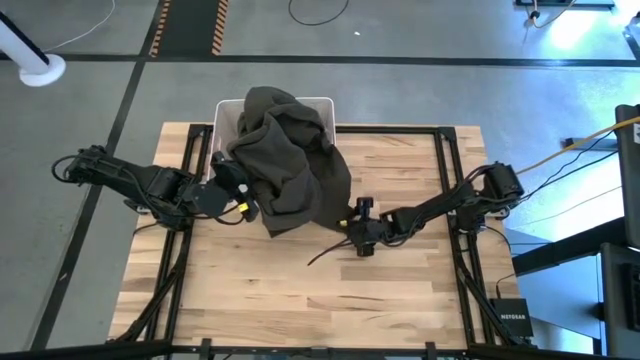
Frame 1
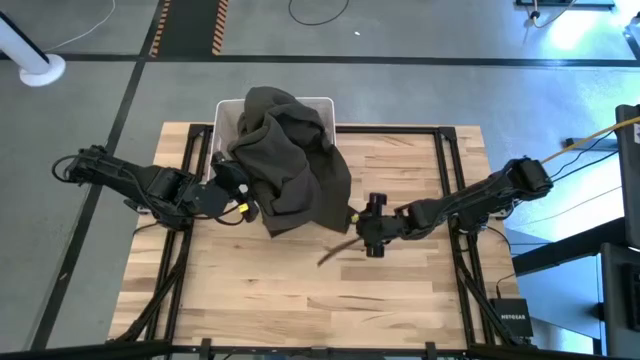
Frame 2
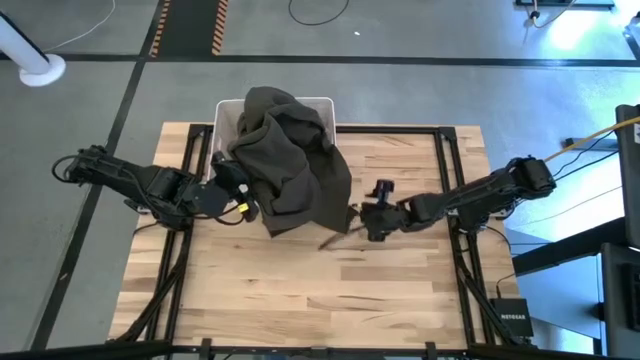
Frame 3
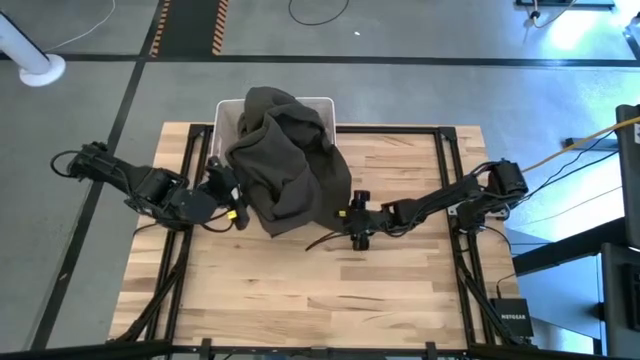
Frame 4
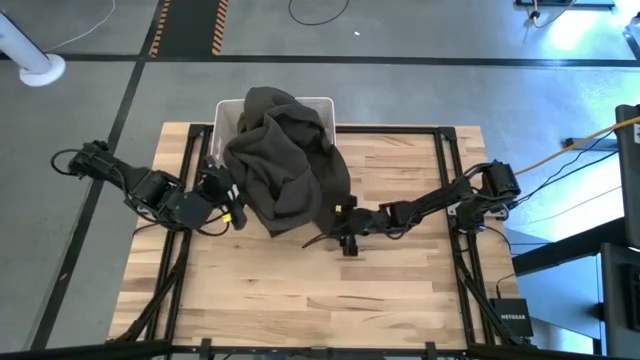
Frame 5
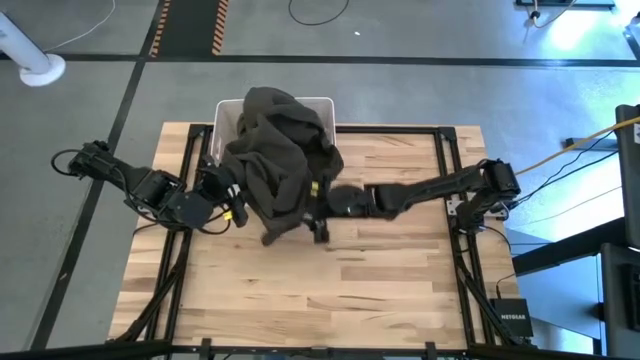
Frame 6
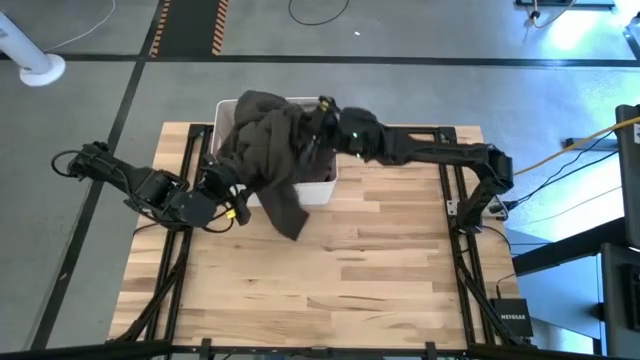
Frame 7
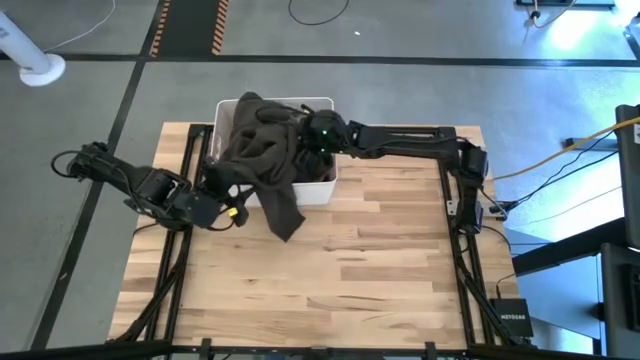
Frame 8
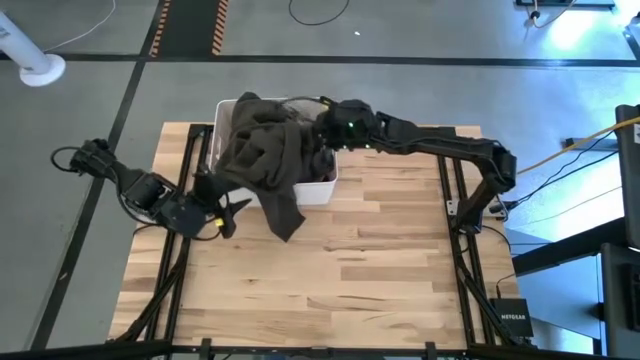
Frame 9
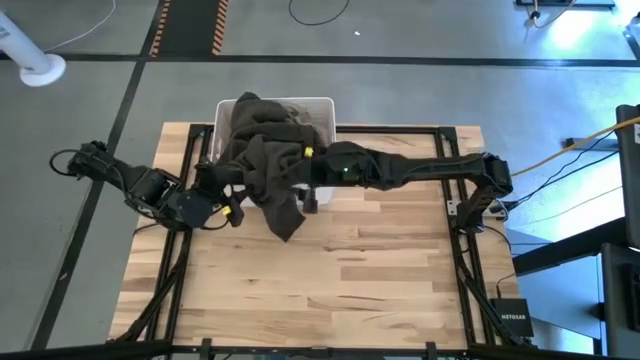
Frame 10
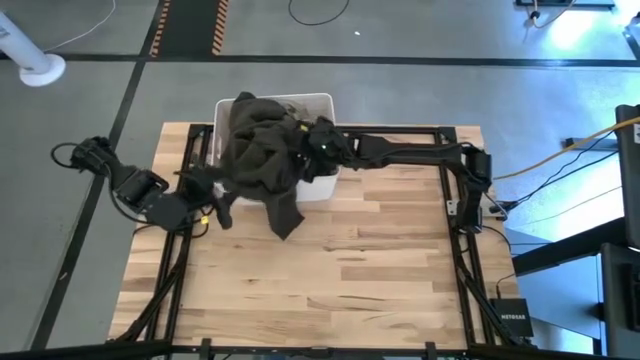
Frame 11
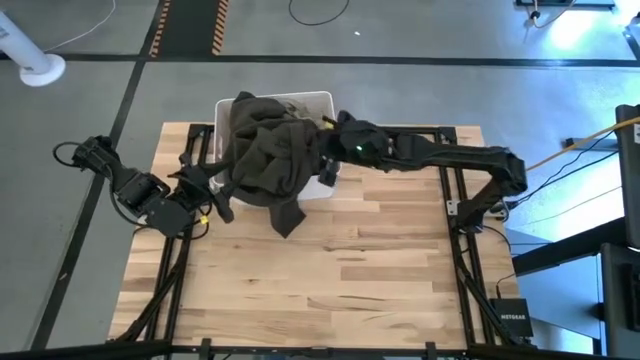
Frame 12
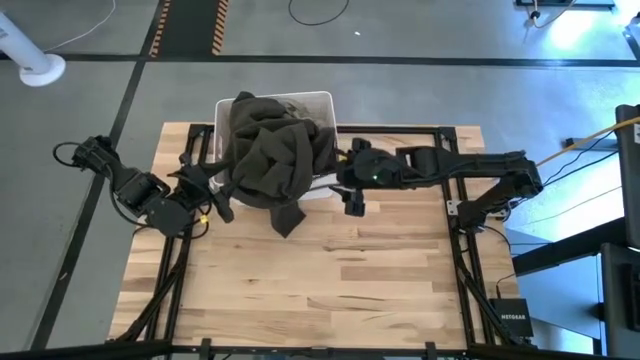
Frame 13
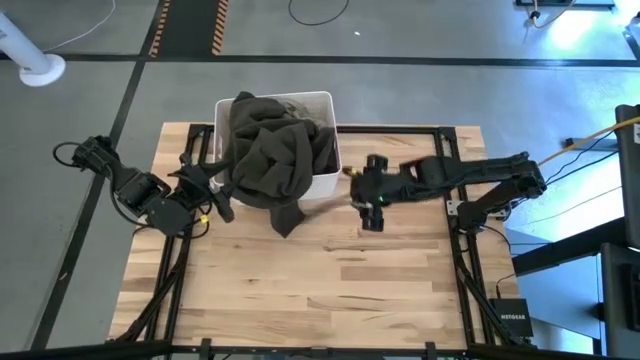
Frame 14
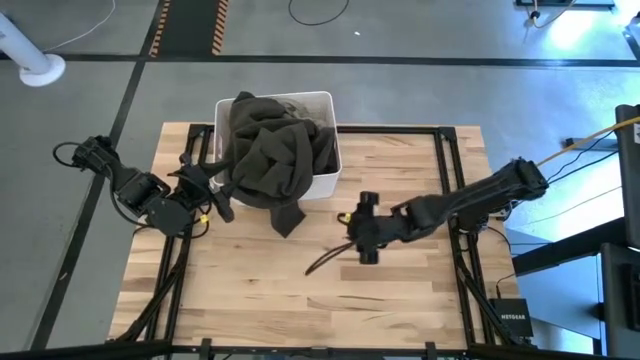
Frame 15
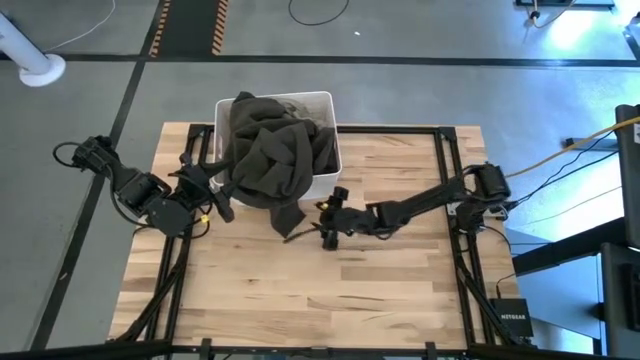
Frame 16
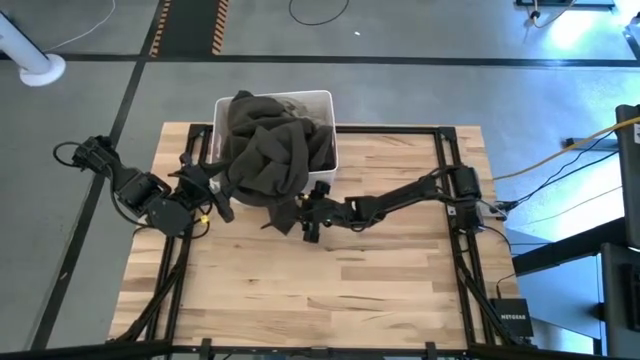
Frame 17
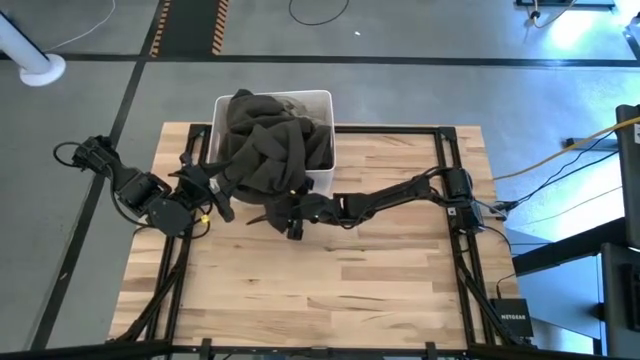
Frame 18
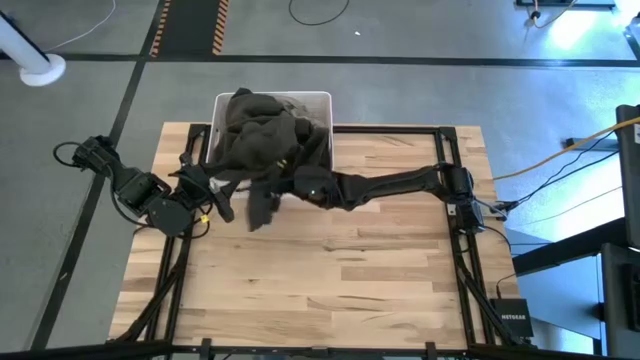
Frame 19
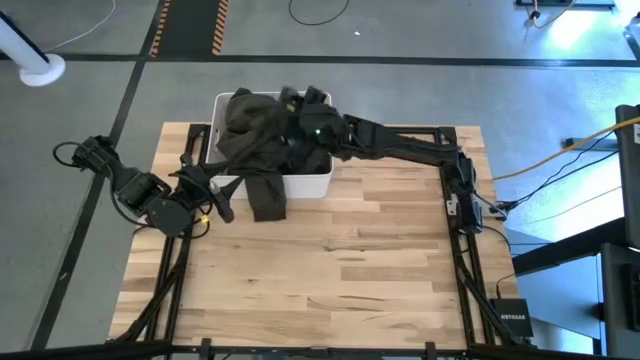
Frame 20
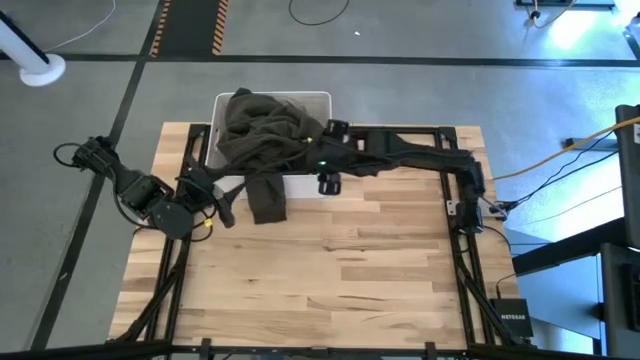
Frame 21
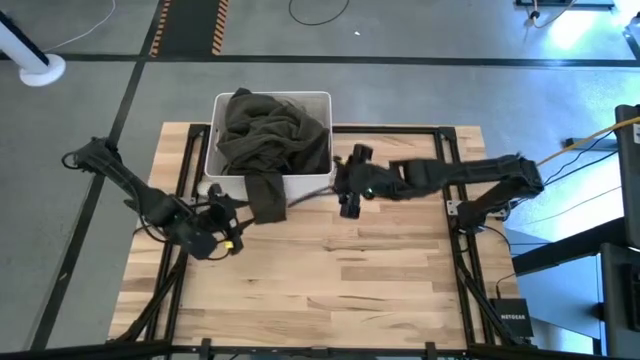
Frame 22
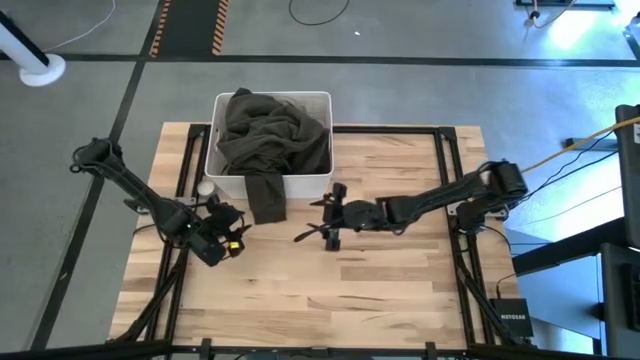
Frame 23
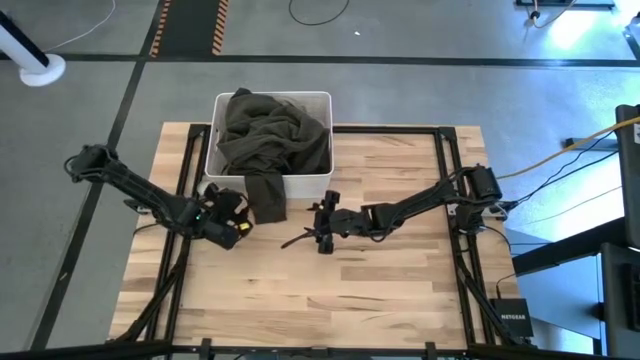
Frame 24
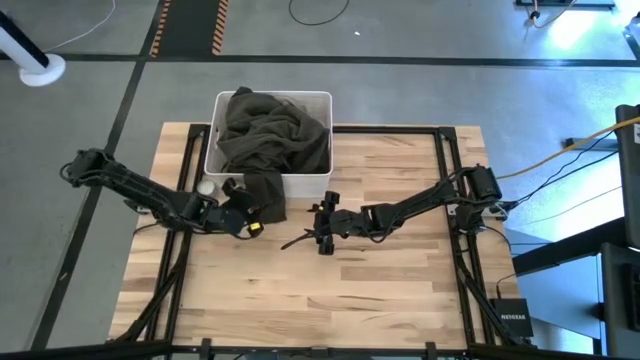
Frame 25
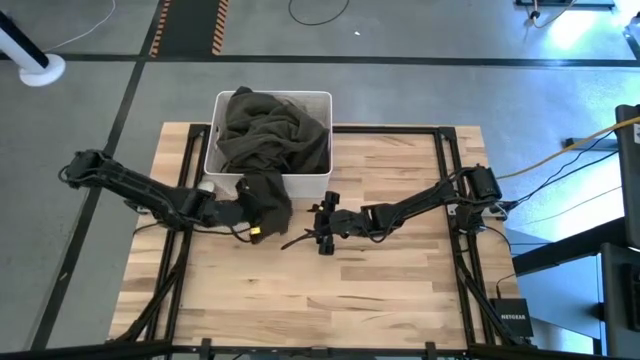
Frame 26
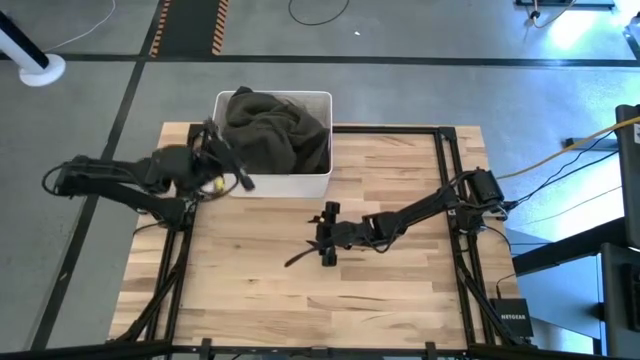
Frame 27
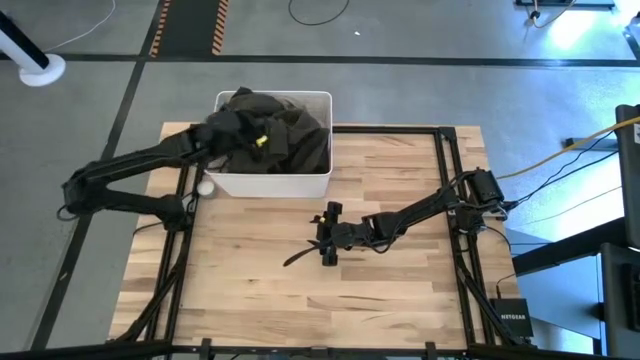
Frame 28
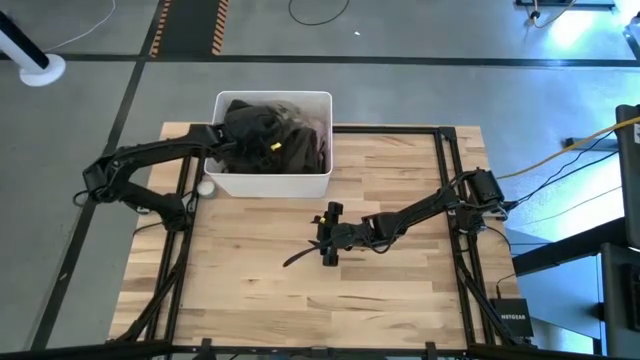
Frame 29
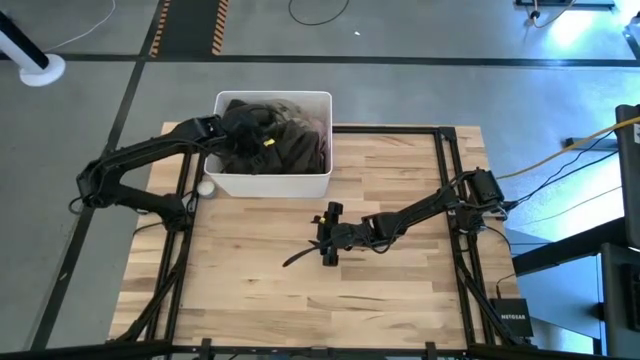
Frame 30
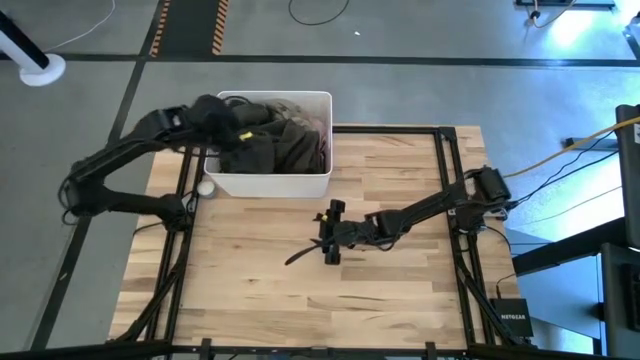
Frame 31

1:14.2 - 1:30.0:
Task: Sort clothes
Put the gray jacket into the white laundry bin

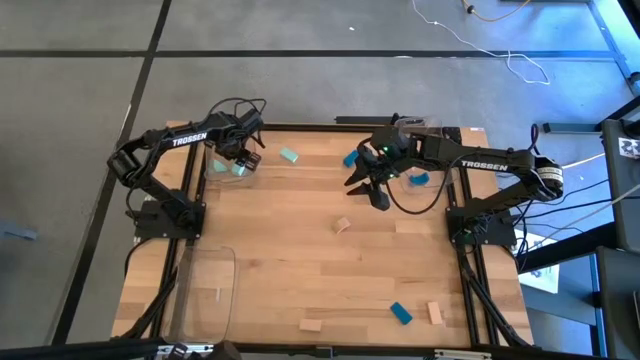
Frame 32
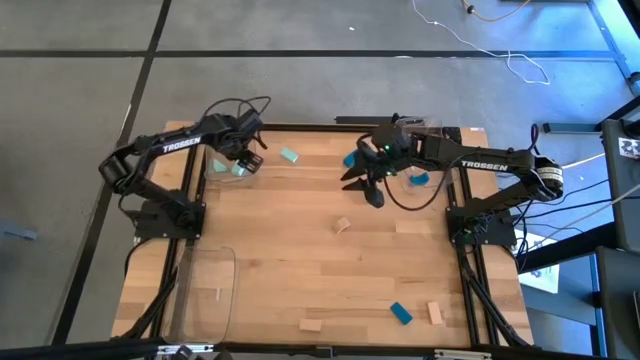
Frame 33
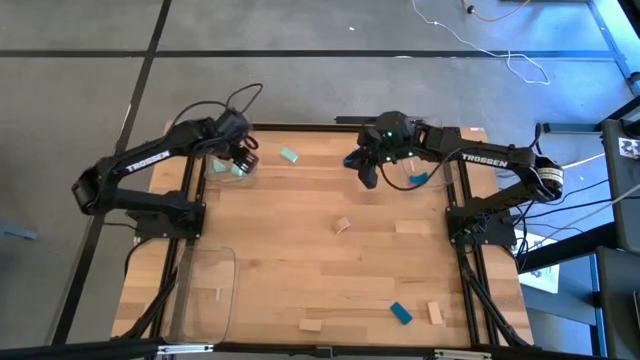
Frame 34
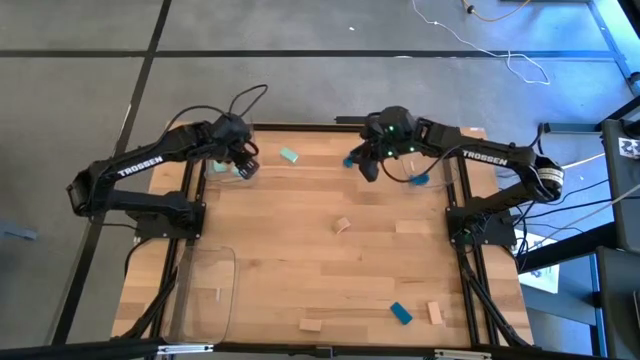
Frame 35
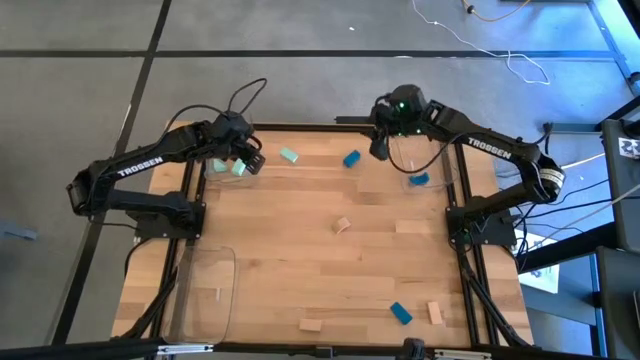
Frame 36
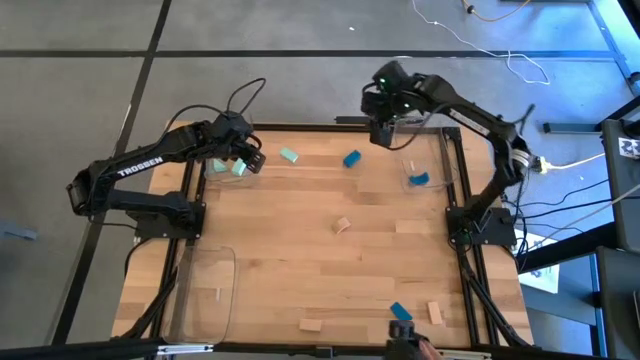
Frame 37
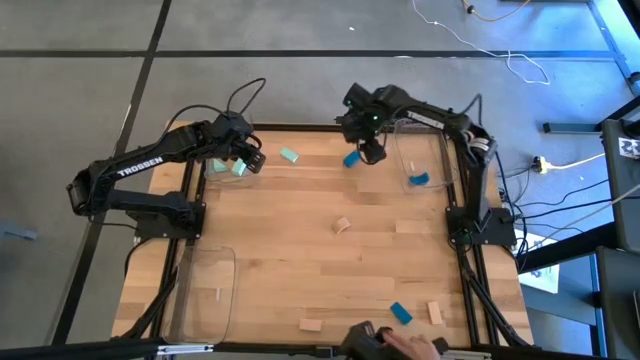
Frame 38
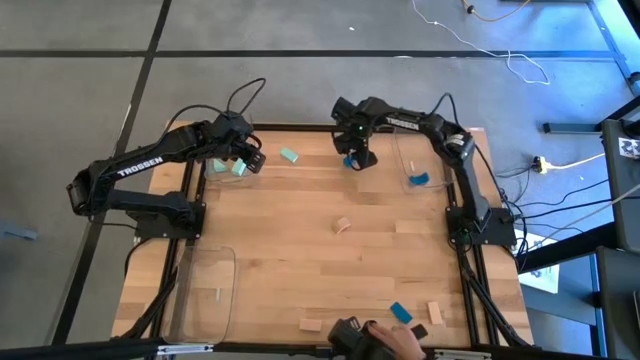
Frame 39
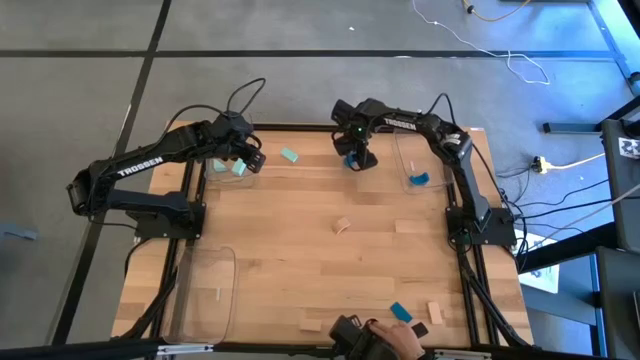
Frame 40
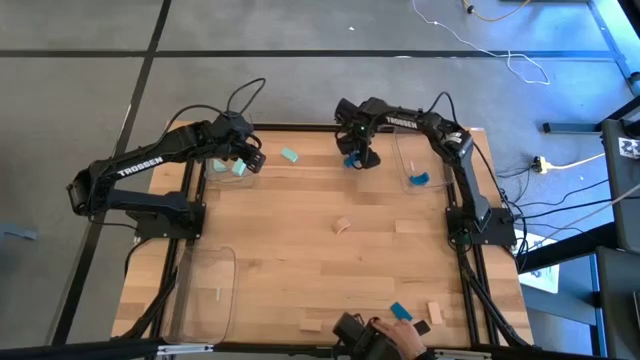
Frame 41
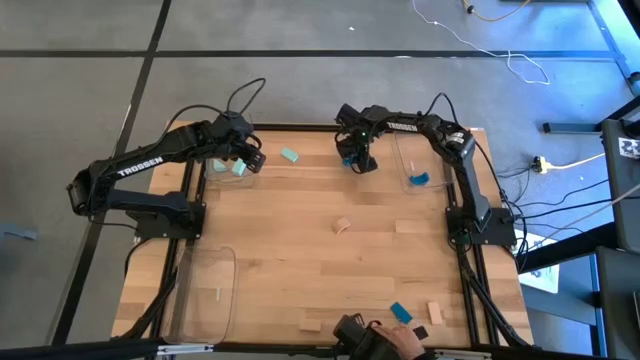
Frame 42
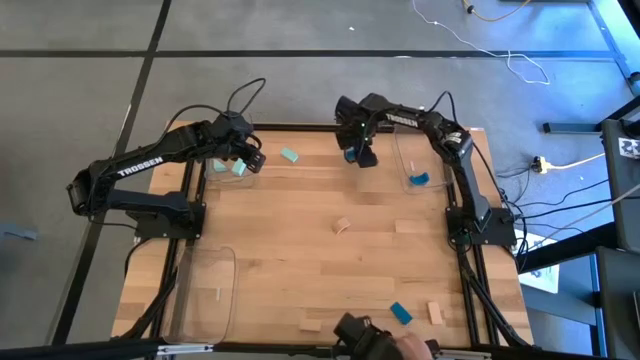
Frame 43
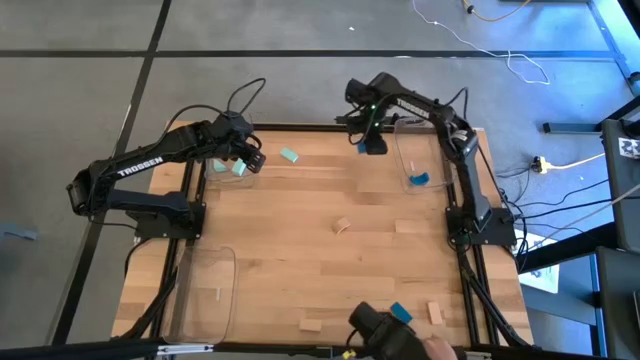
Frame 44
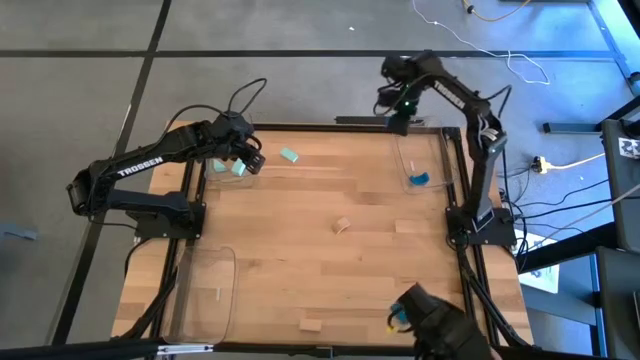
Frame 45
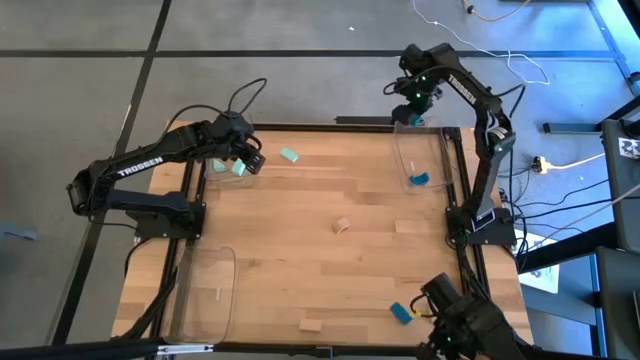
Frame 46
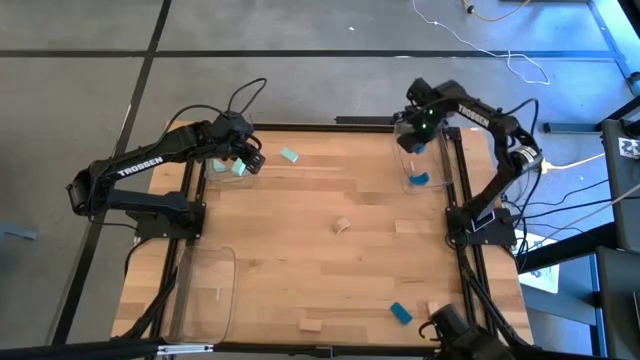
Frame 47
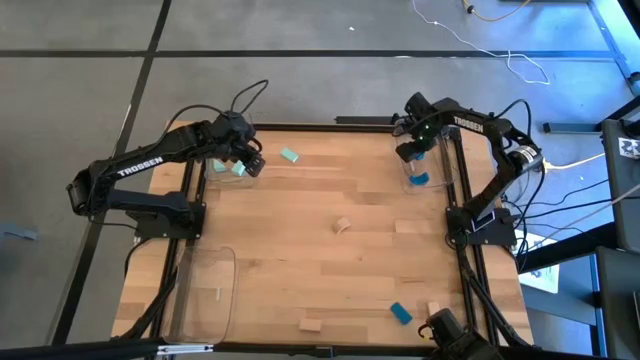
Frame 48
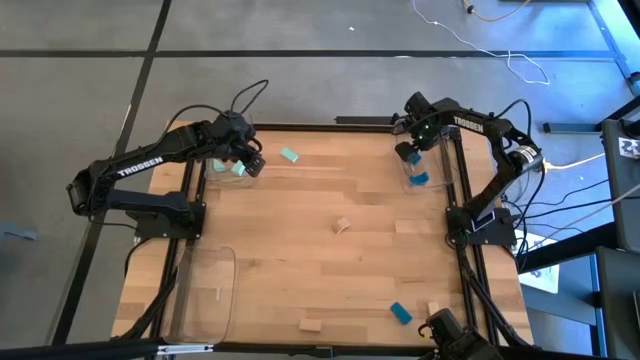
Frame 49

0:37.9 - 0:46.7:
Task: Sort & place blocks by color
Put the top blue block into the top right transparent bin
